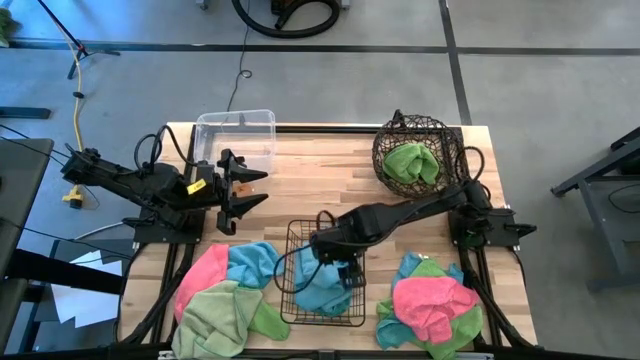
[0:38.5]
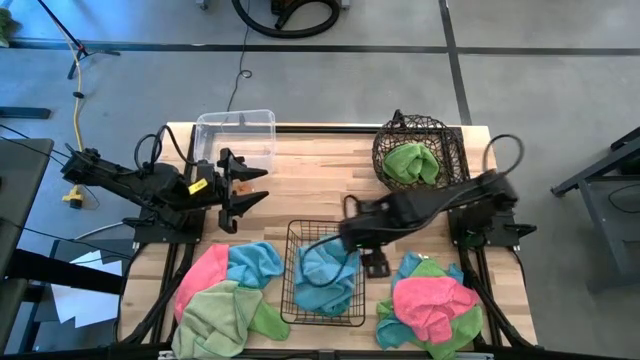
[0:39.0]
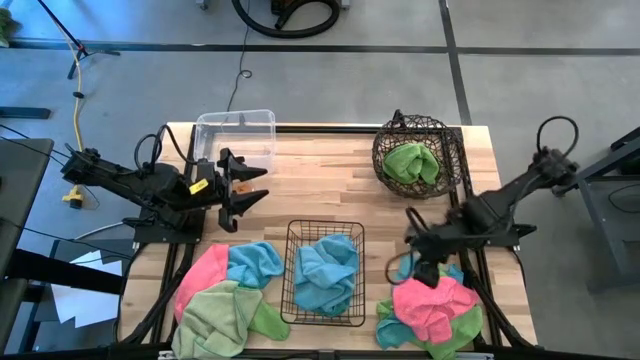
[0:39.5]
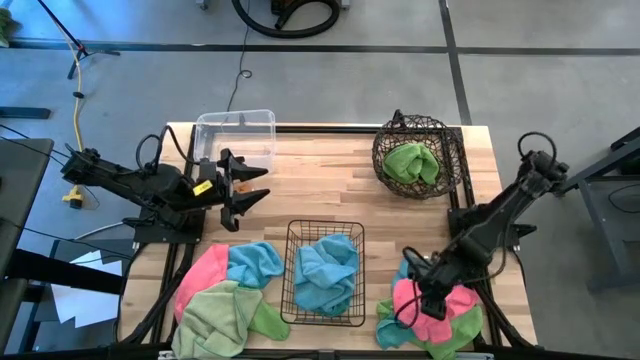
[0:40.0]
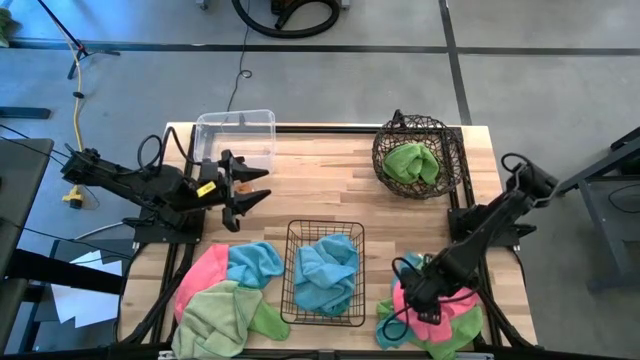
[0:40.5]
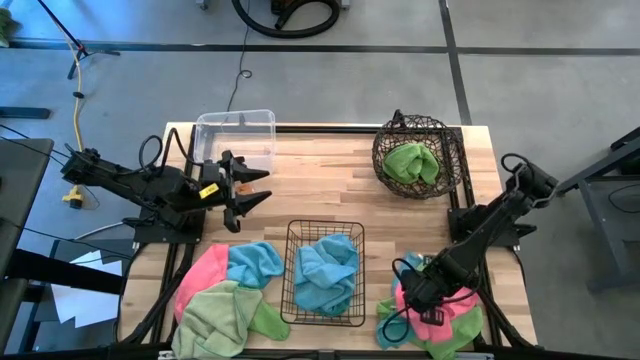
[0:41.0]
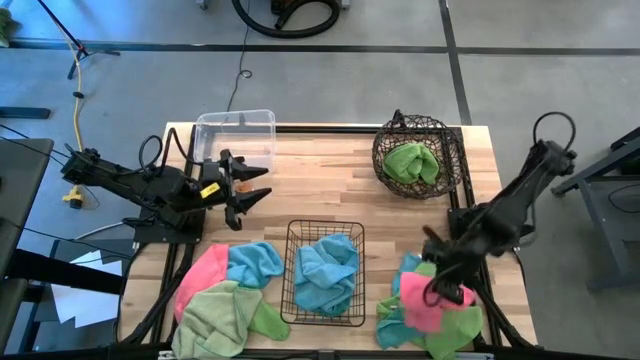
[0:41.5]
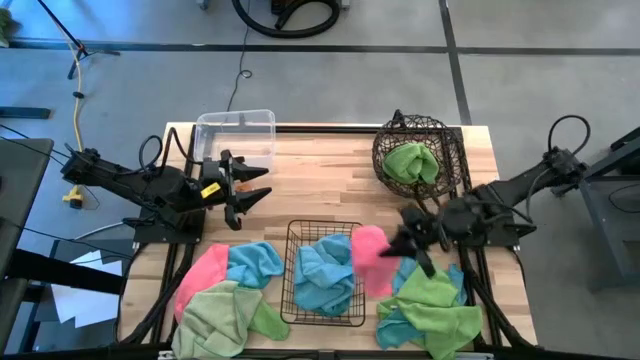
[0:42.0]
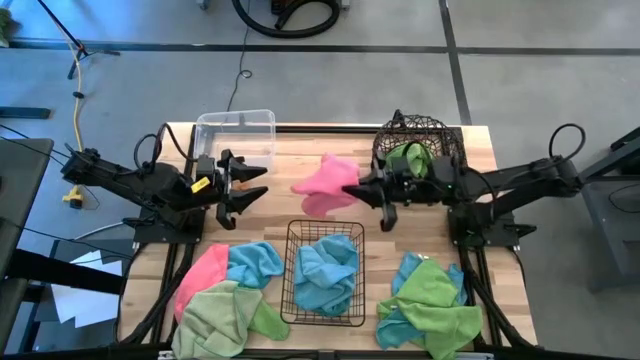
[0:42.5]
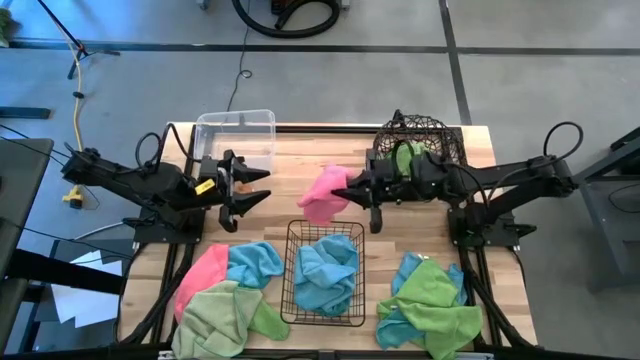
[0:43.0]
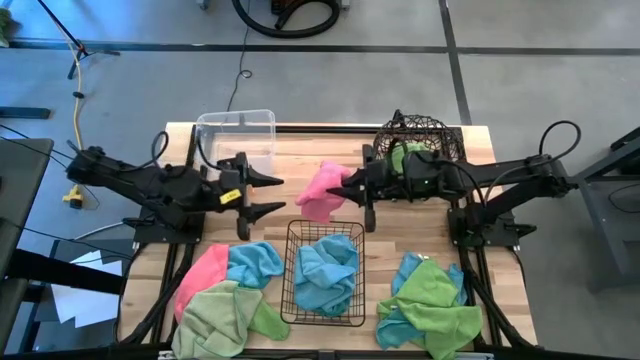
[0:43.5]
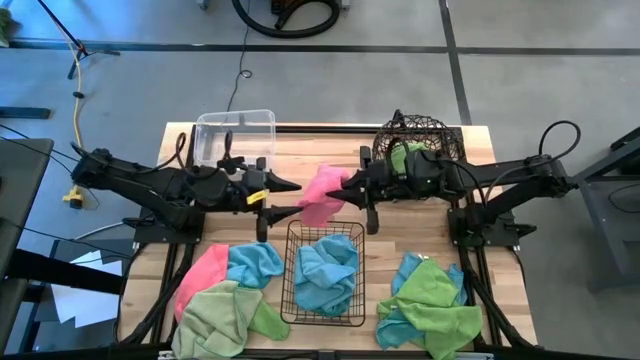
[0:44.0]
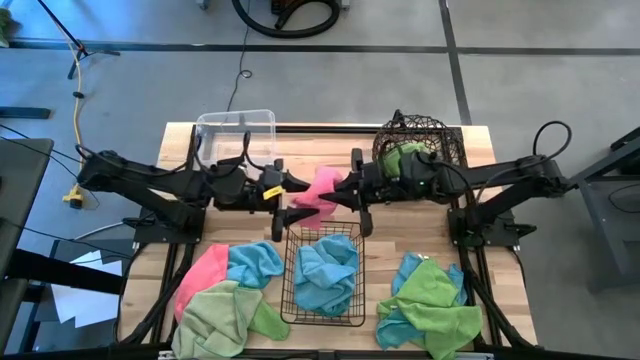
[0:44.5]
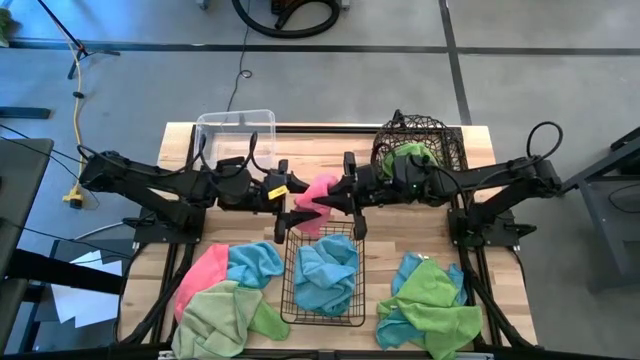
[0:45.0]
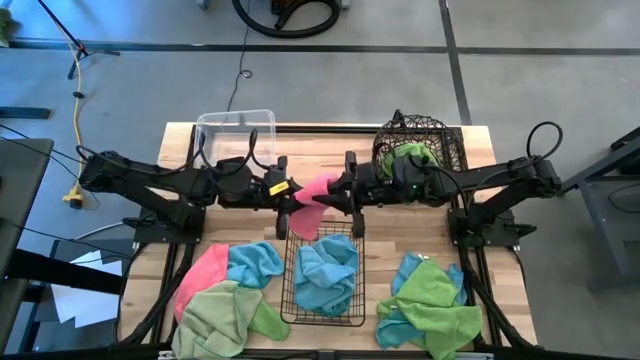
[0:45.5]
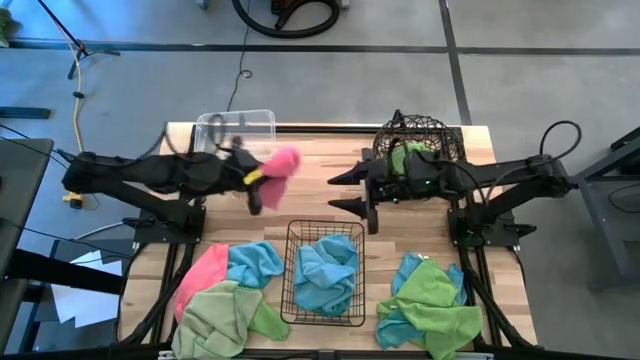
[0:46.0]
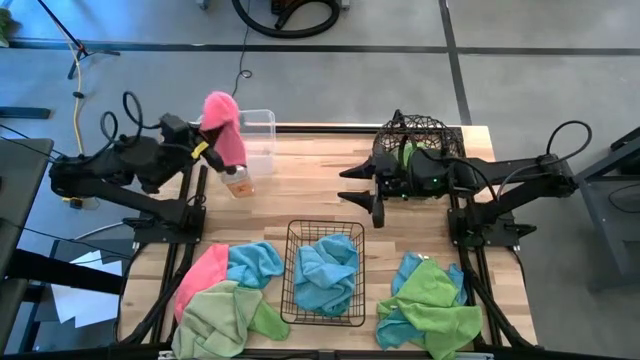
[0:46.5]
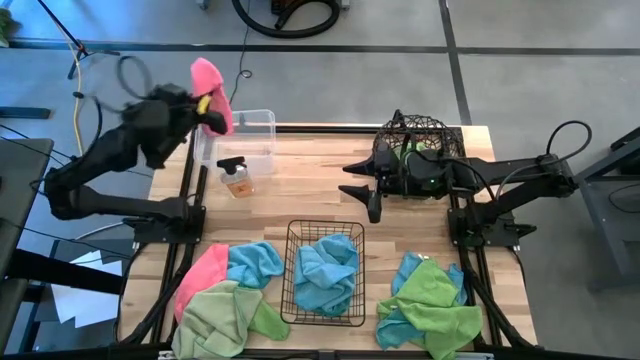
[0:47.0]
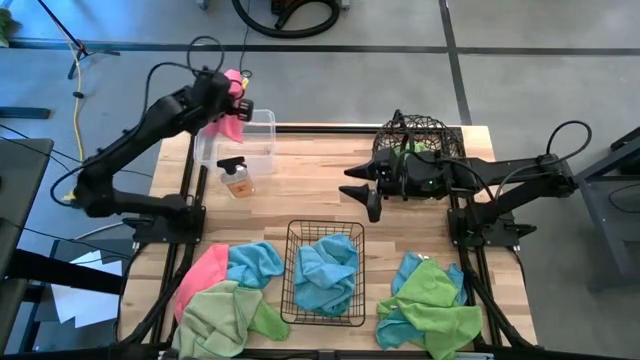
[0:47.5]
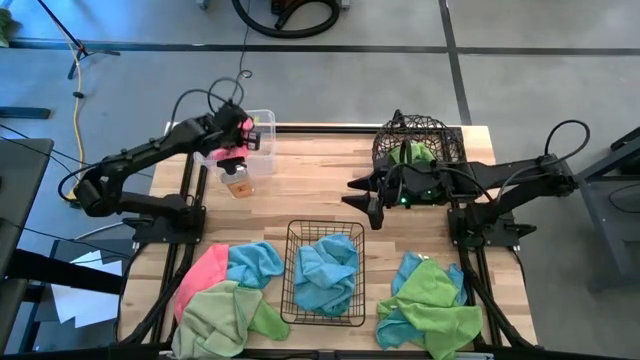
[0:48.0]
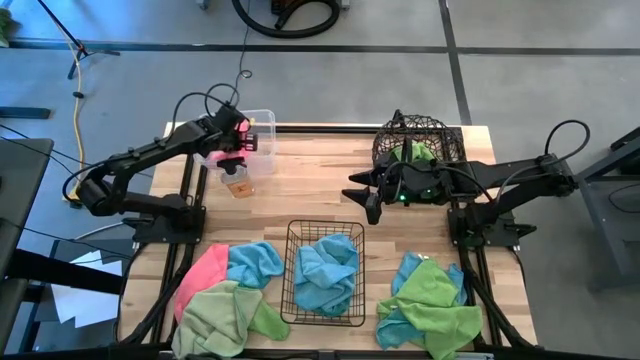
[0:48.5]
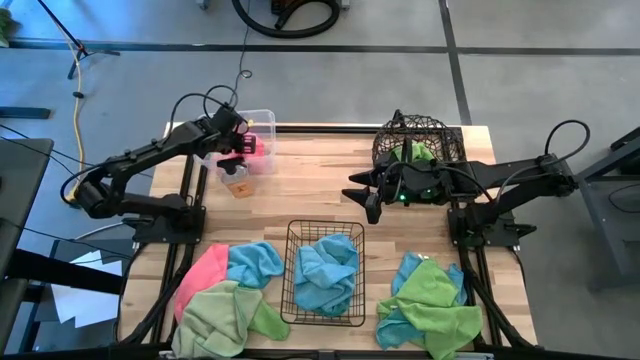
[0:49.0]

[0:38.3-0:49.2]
Task: Sort microfiber towel by color & place in baskets
Put the right pink towel into the transparent left bin

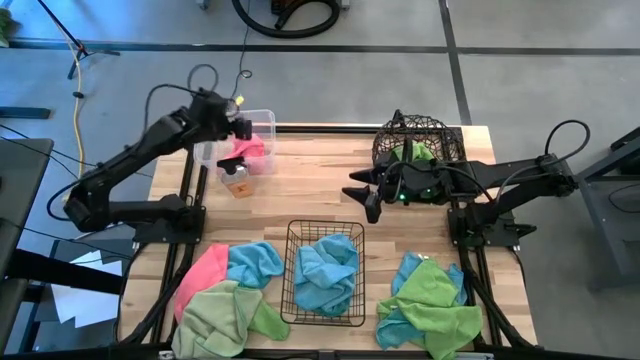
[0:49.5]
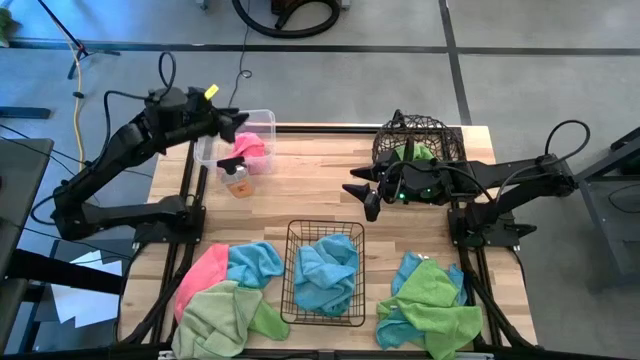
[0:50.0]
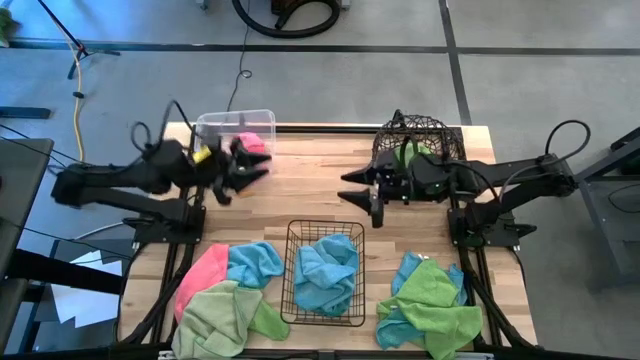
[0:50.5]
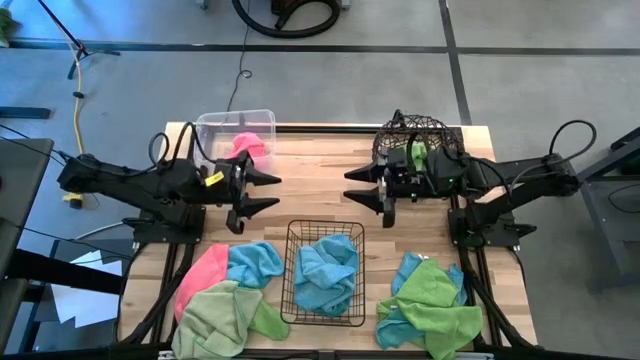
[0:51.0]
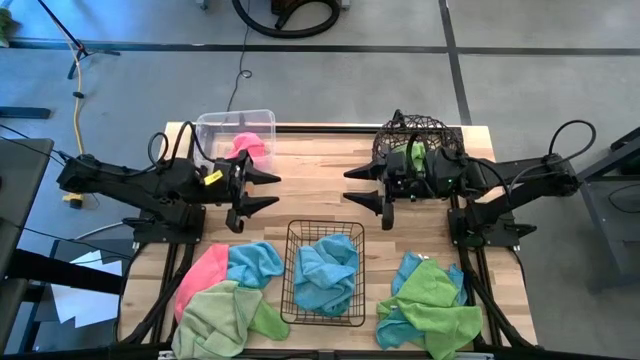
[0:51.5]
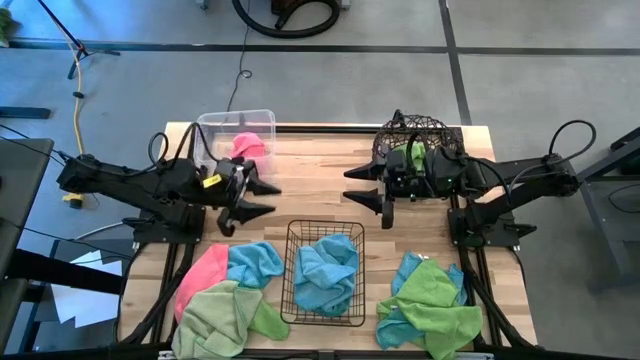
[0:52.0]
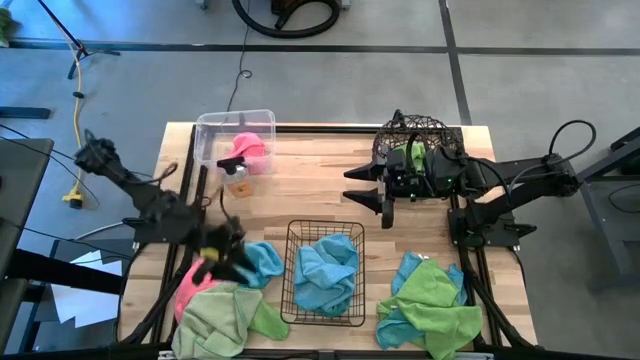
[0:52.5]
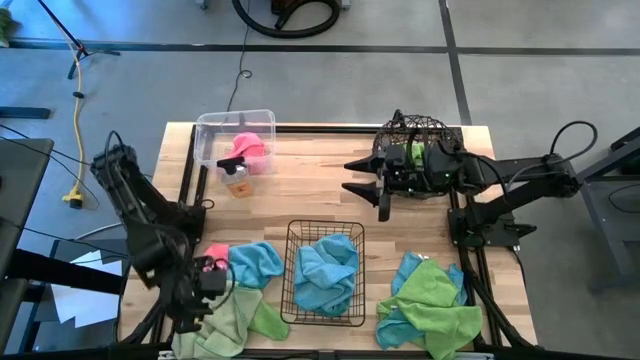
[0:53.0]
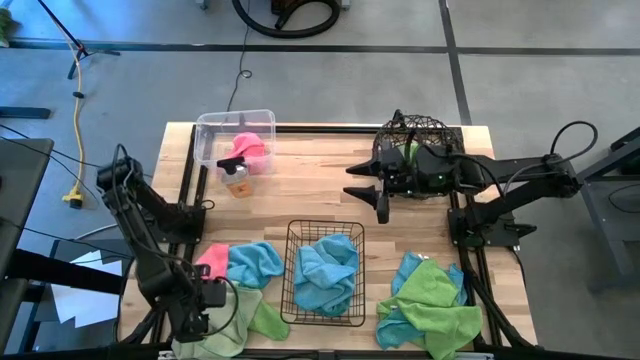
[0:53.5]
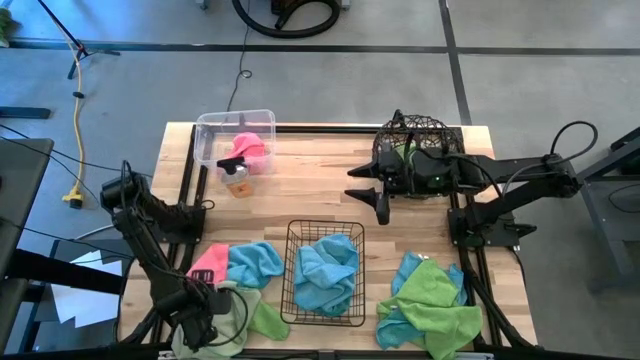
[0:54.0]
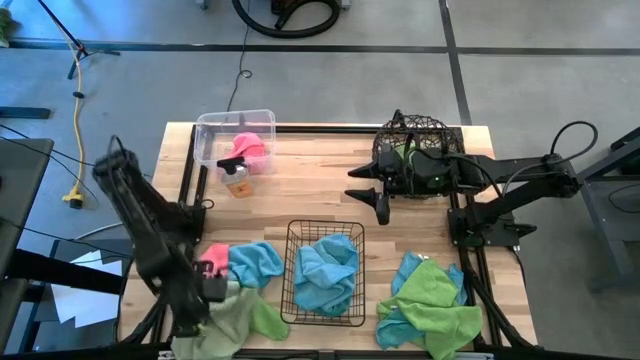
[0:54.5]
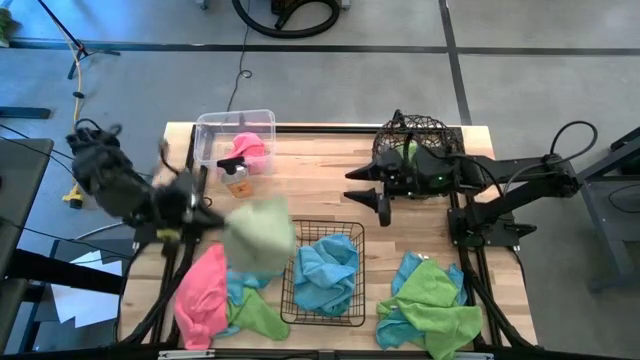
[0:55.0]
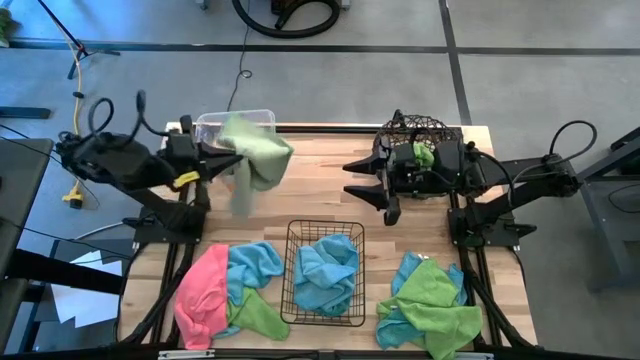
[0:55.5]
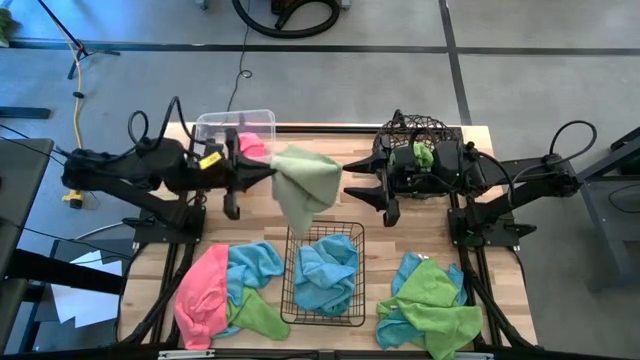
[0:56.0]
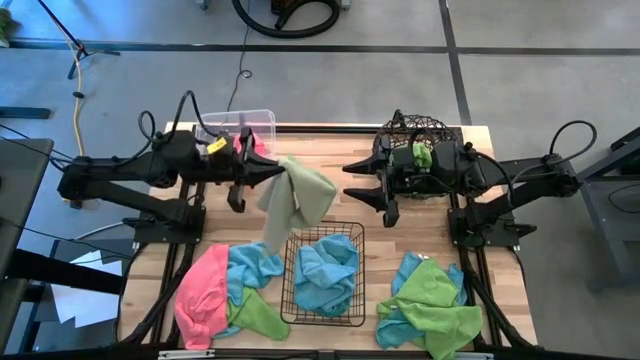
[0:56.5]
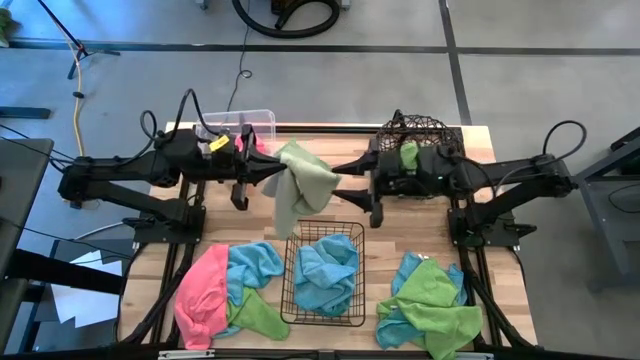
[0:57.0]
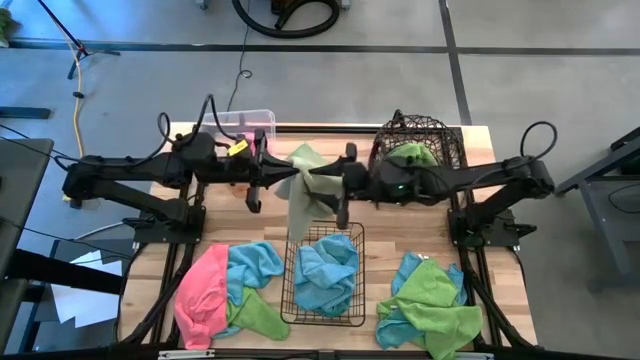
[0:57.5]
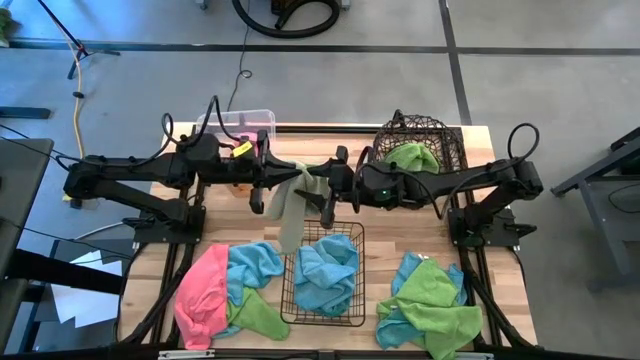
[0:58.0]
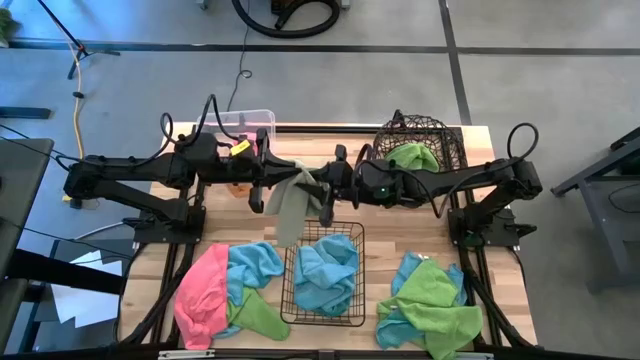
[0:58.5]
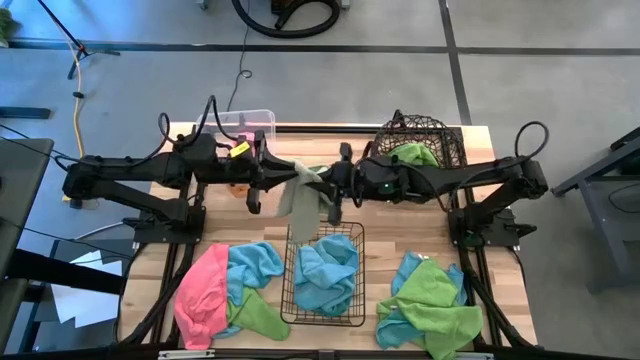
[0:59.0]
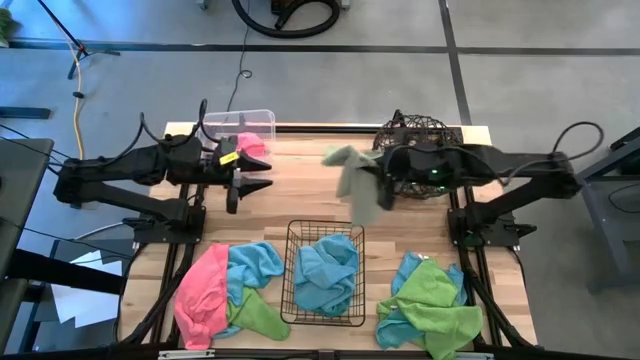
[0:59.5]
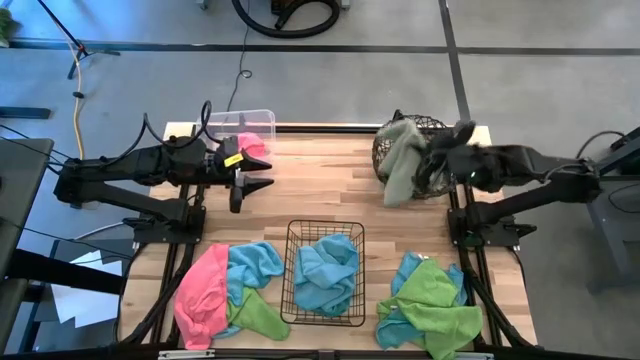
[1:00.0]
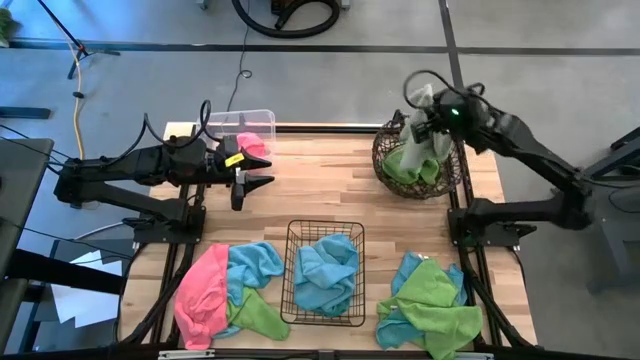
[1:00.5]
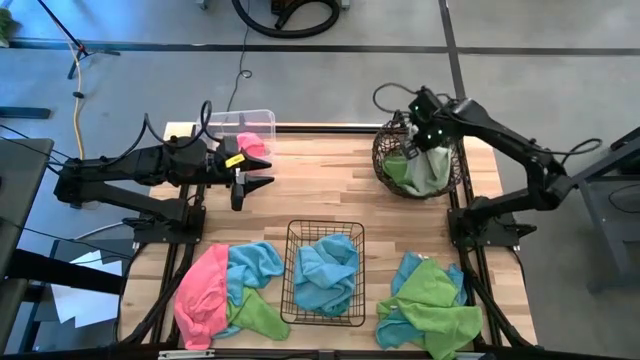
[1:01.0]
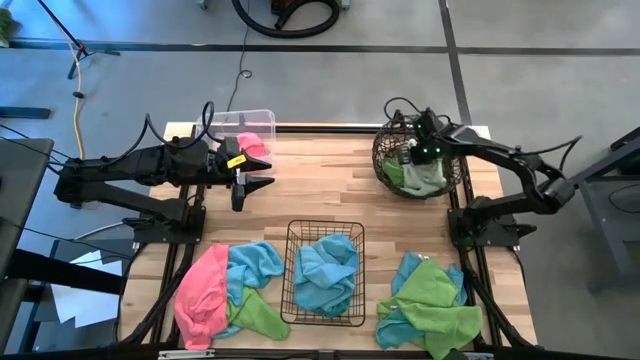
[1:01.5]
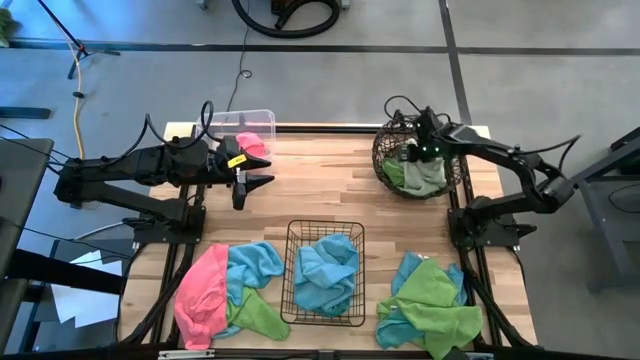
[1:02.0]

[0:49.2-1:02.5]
Put the light green towel into the left transparent bin
